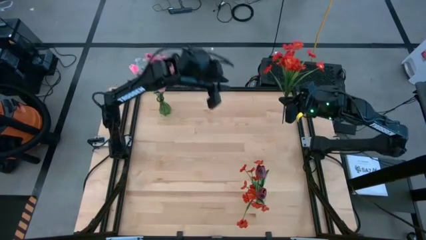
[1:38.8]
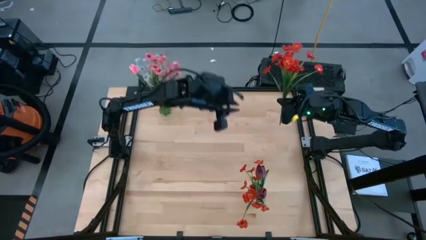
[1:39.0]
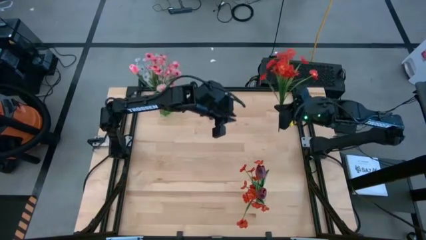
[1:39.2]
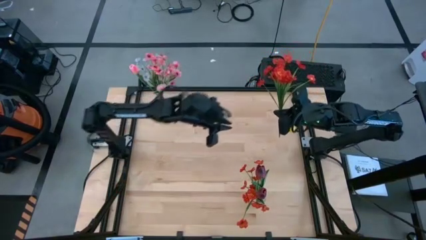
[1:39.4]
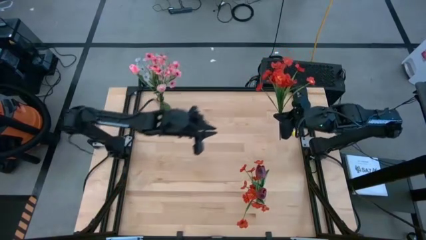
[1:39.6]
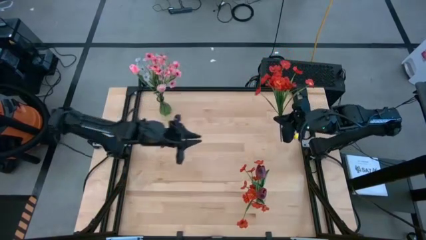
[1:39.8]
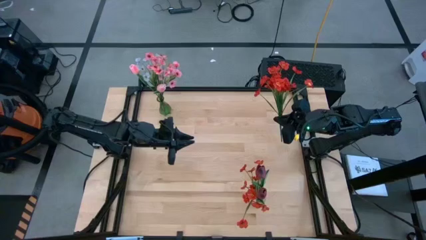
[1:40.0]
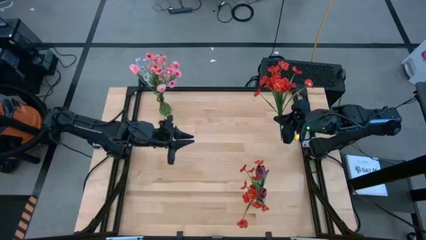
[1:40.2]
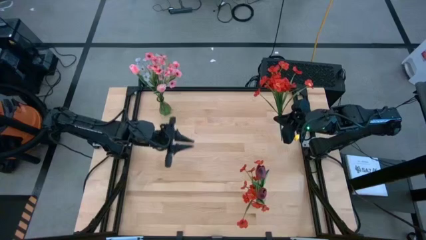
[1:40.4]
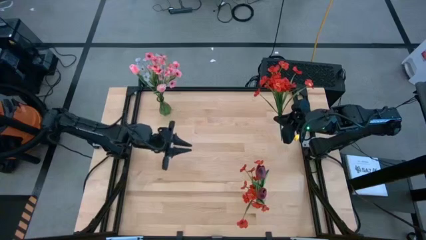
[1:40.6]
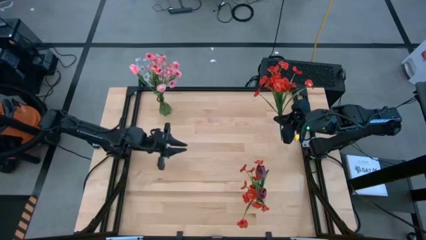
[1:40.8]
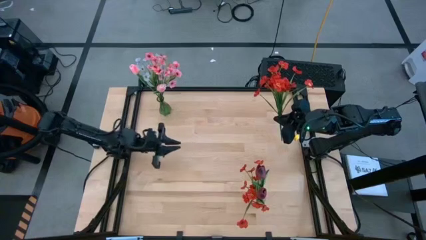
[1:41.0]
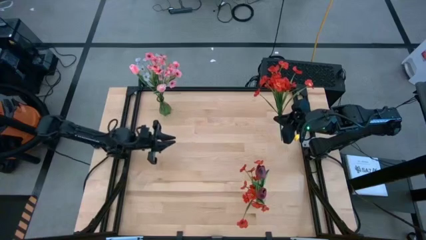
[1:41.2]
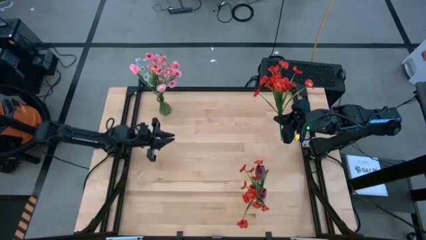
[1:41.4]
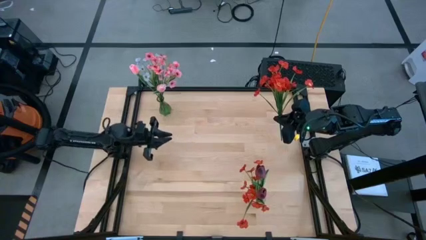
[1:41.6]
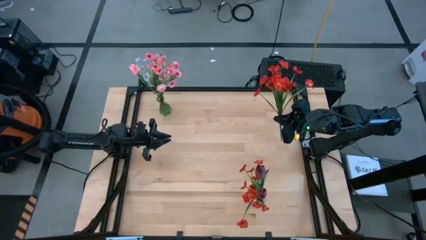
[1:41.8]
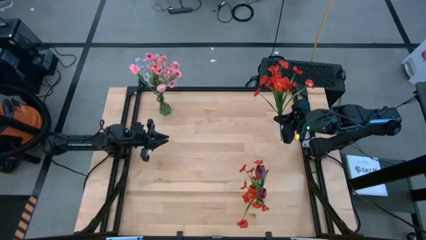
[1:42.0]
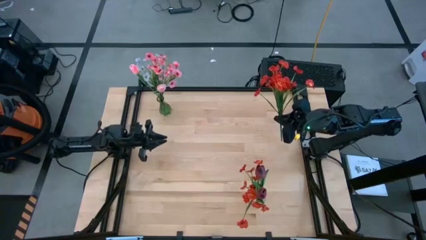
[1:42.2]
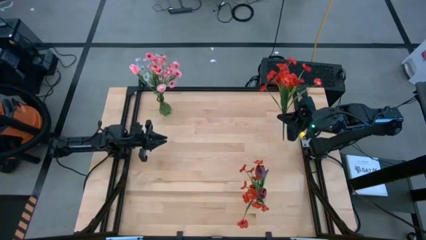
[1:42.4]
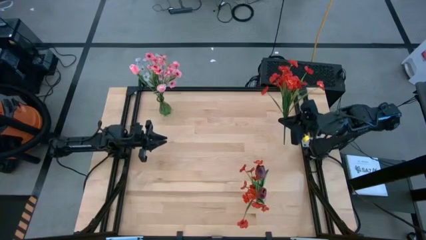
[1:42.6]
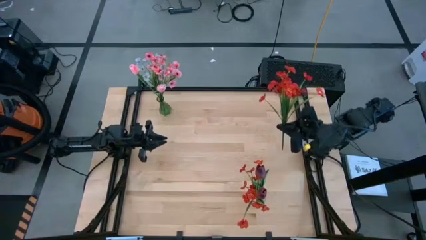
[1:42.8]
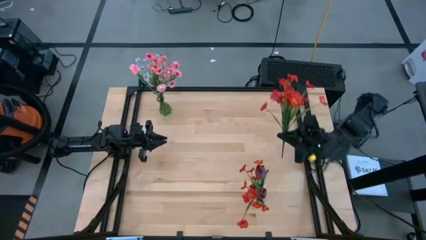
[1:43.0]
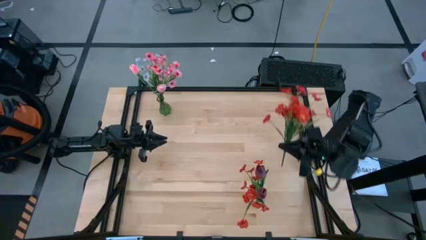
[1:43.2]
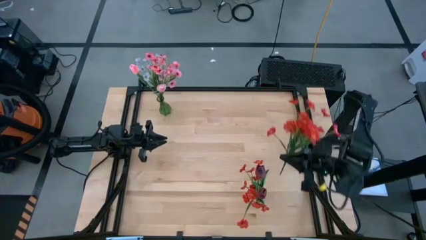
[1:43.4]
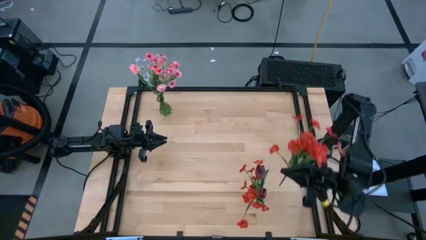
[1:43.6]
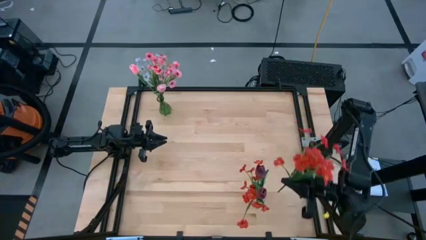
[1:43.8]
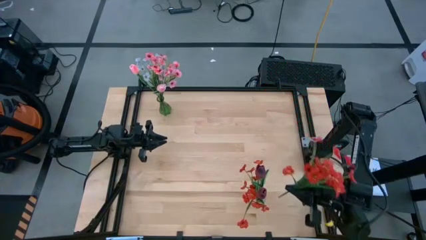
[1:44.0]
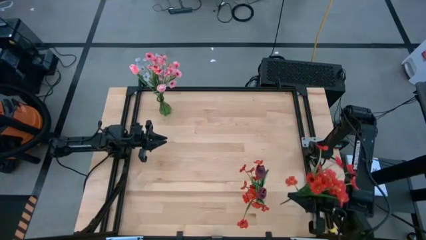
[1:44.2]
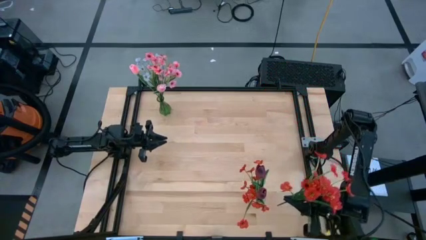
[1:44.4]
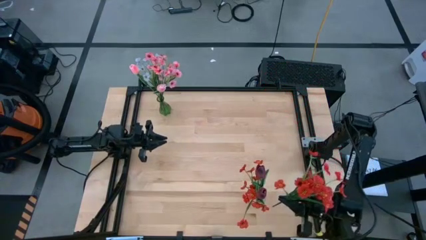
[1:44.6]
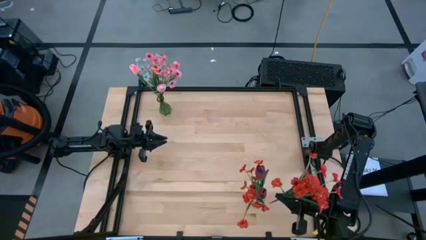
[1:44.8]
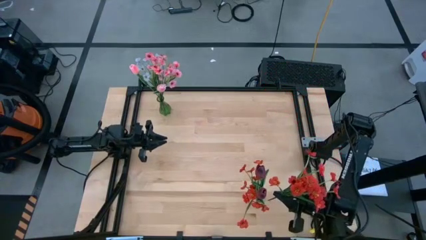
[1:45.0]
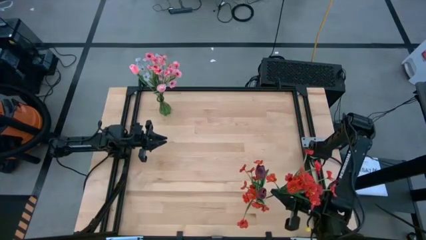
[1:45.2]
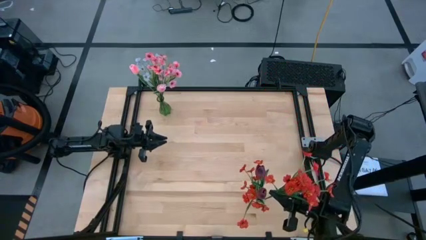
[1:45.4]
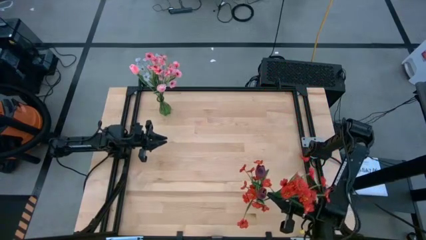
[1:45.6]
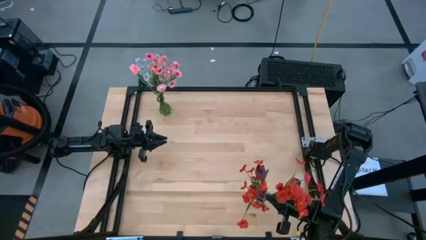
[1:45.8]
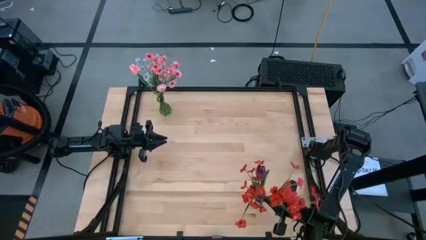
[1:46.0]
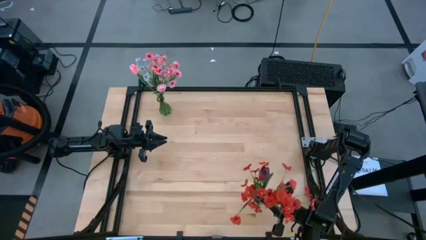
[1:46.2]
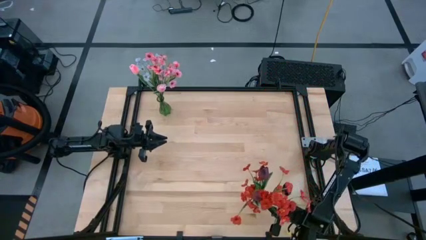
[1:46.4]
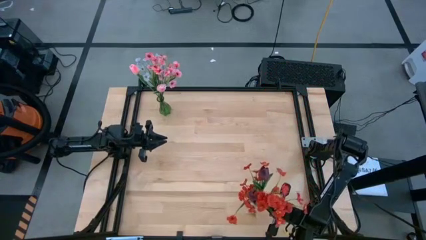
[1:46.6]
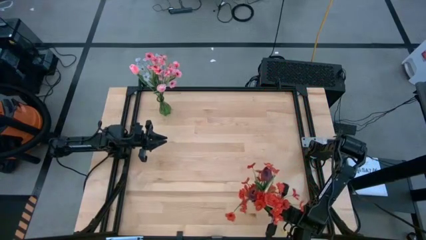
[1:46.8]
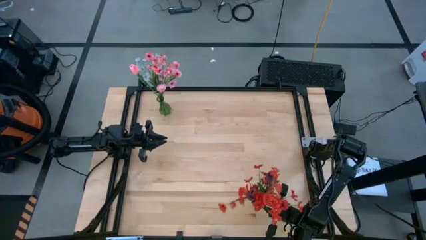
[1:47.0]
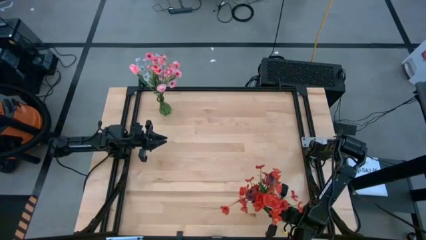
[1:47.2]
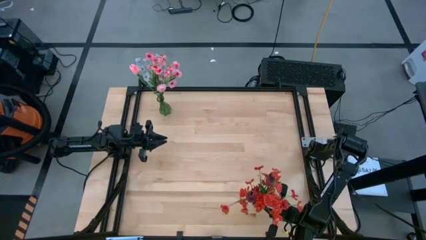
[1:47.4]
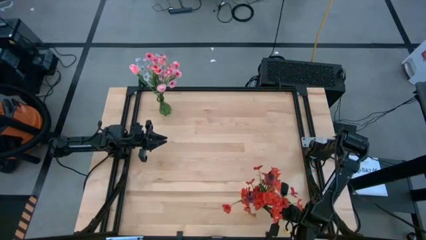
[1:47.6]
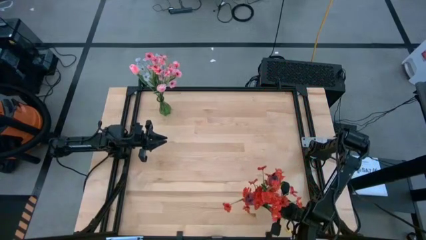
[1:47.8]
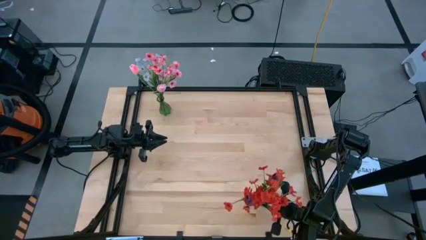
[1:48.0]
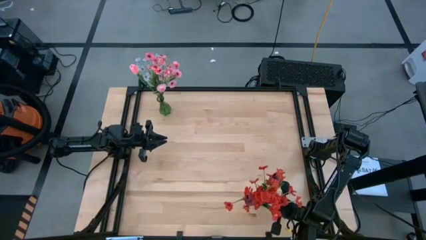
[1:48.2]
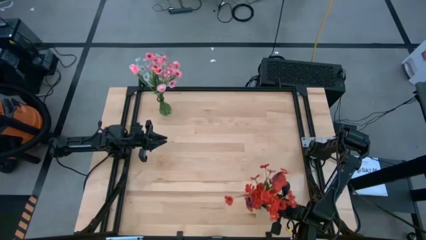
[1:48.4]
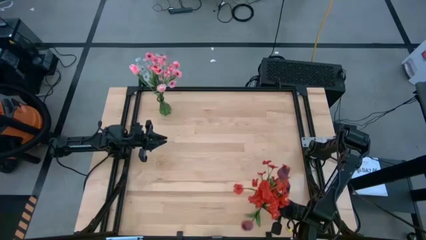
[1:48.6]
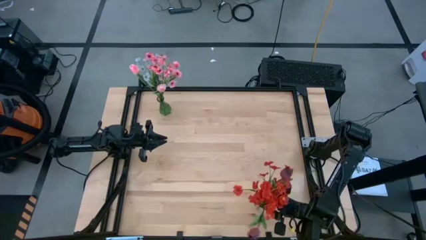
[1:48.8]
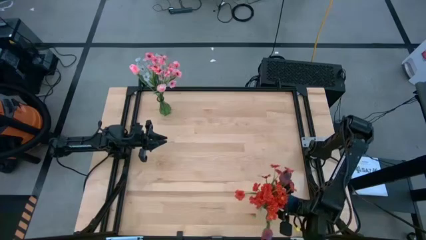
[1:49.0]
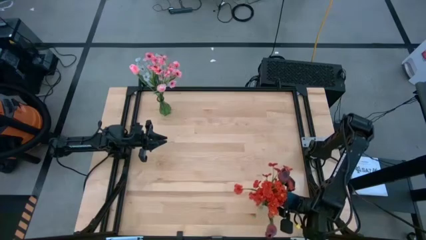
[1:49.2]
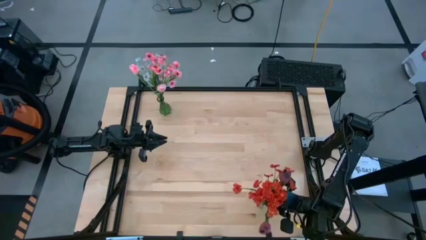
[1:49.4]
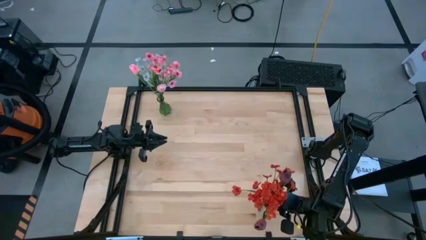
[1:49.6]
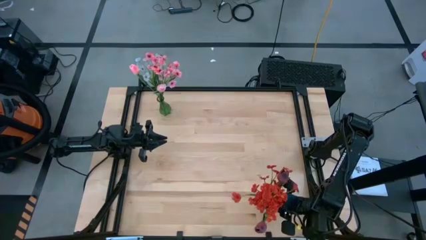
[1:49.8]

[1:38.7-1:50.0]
Task: Sort flowers into vase by color
Put the orange flowers into the transparent vase

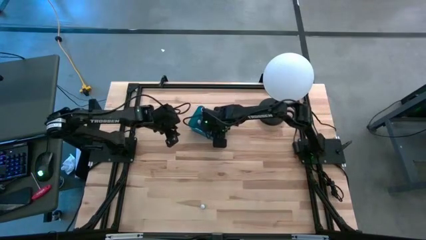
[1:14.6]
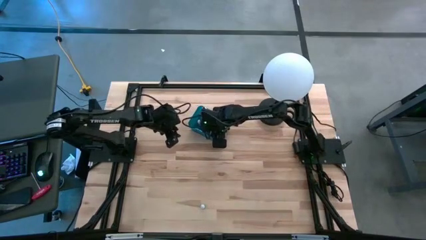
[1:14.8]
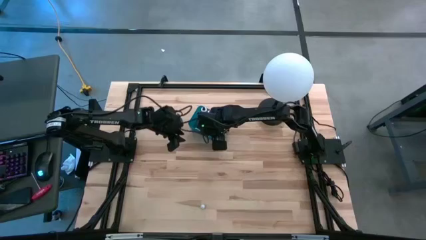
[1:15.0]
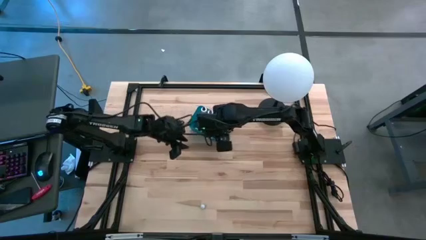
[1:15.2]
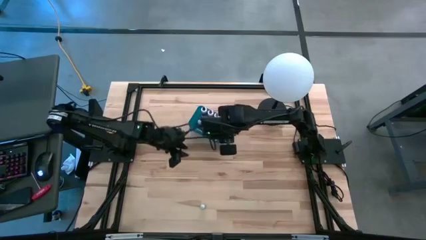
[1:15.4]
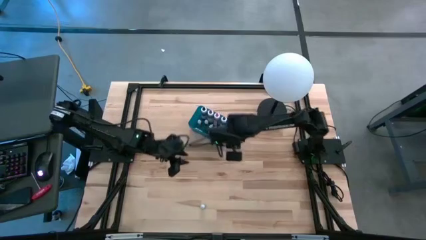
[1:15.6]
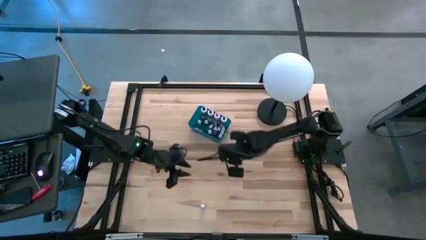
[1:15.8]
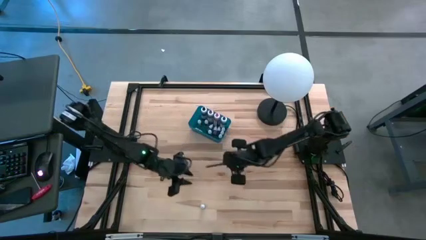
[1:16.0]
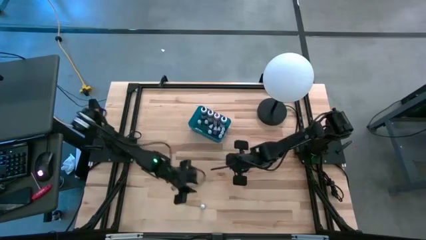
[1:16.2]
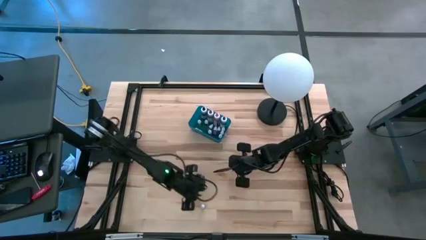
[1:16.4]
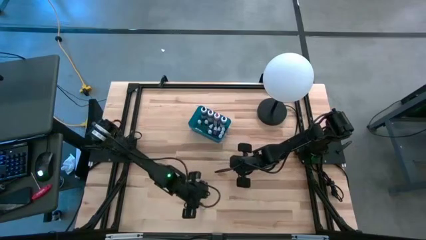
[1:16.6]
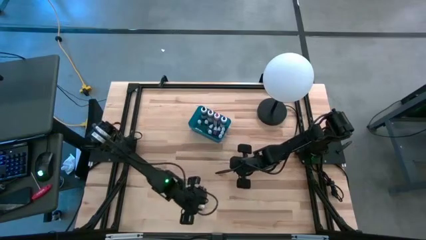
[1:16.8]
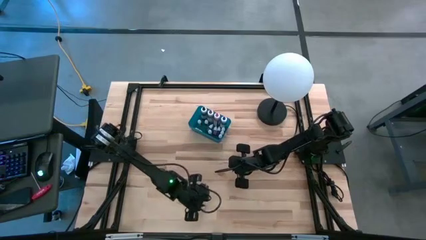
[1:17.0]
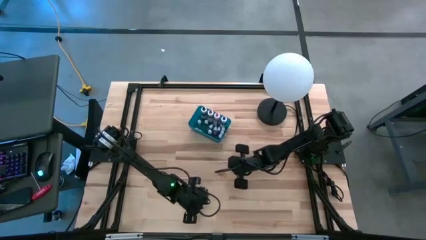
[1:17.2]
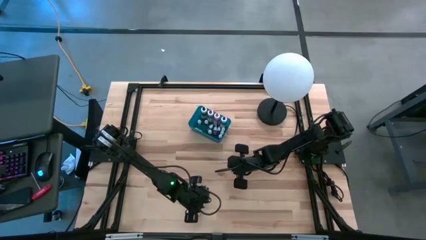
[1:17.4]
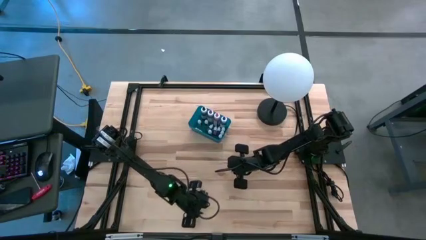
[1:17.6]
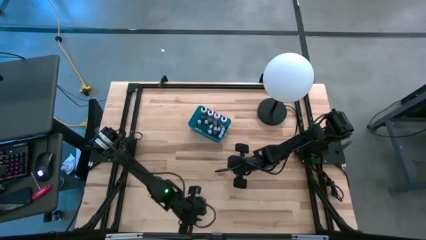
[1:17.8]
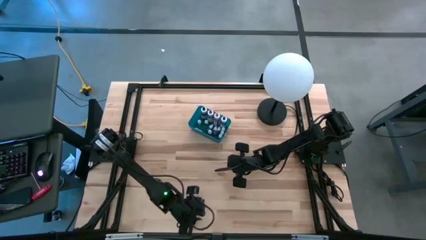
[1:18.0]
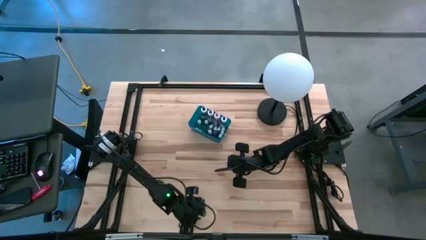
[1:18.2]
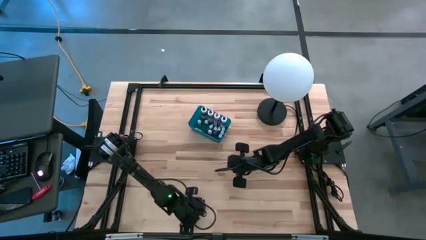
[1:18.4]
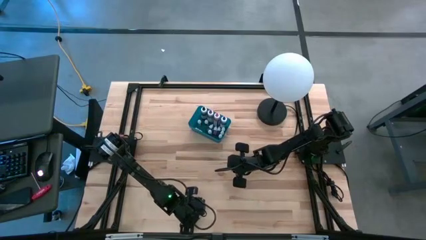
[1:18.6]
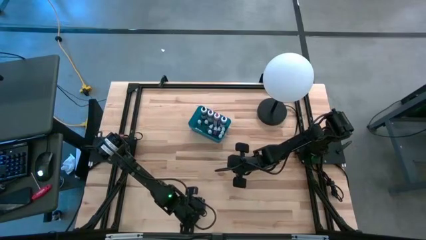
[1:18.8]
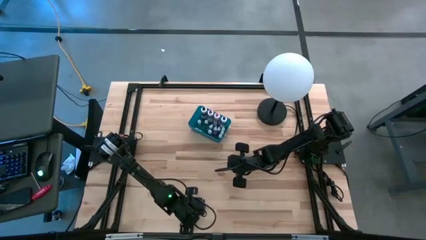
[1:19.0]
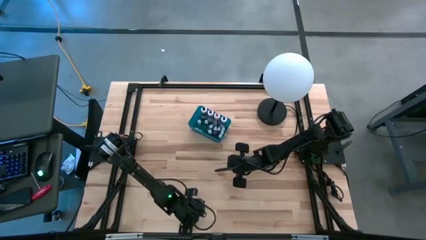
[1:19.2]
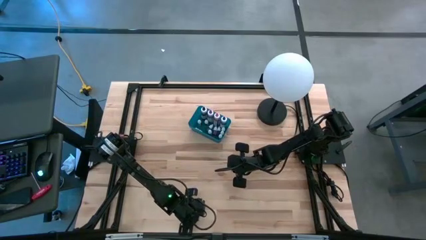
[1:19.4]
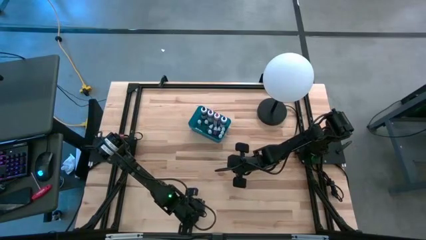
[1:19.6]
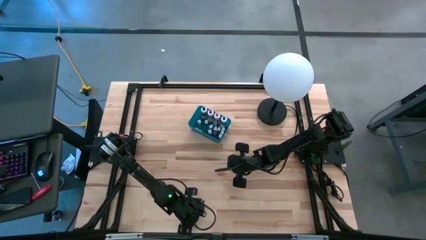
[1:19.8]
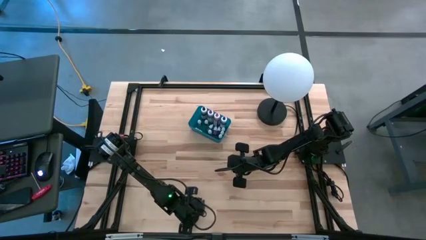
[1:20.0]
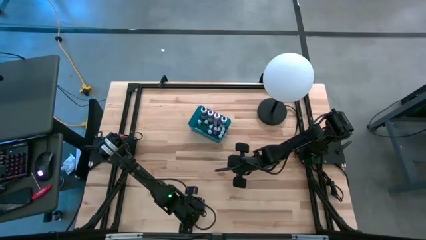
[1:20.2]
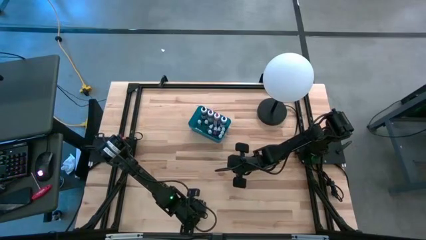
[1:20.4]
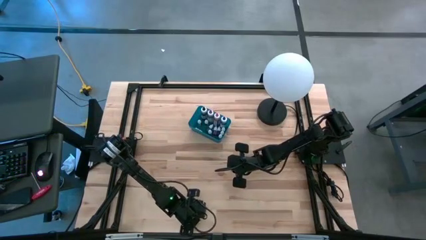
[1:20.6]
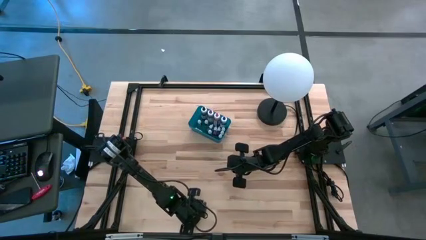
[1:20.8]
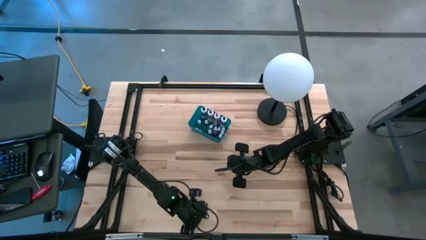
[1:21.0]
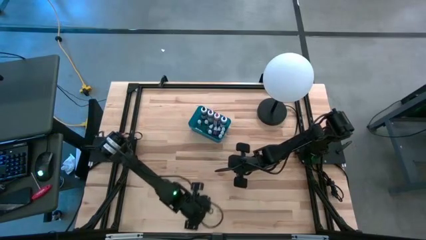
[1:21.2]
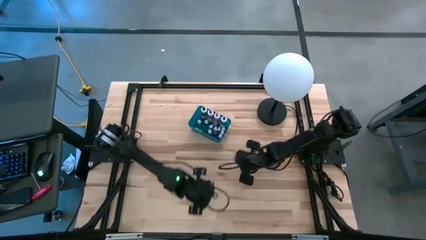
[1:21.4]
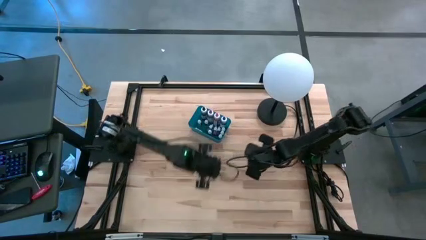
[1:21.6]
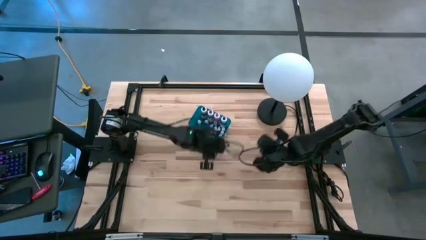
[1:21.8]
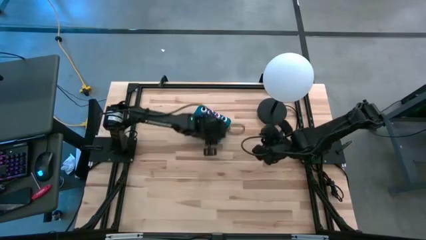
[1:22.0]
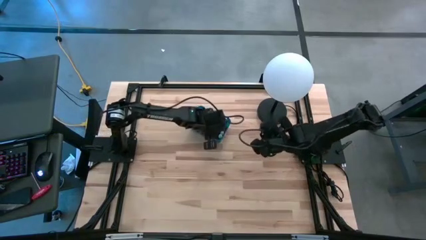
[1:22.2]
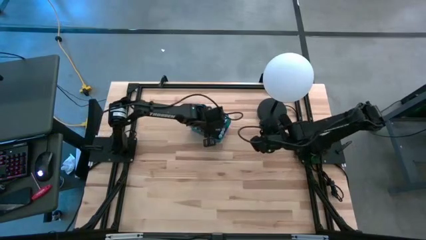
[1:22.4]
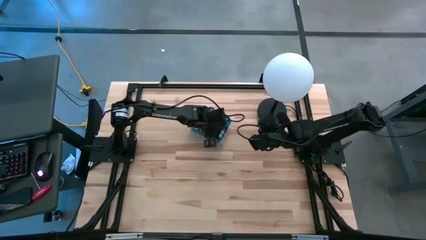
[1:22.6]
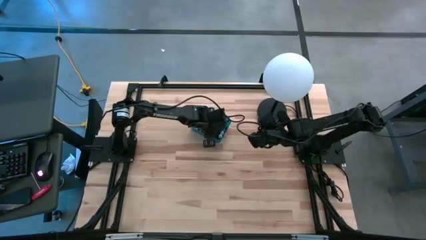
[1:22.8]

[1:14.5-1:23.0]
Task: Pick & Place food coloring
Put the small purple food coloring bottle into the blue bin
